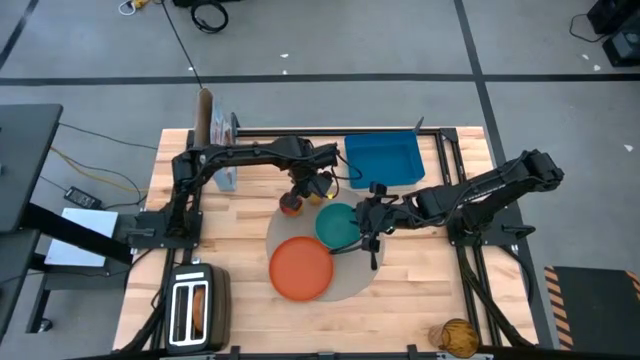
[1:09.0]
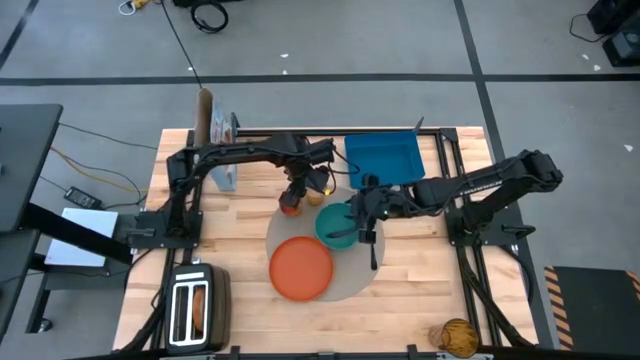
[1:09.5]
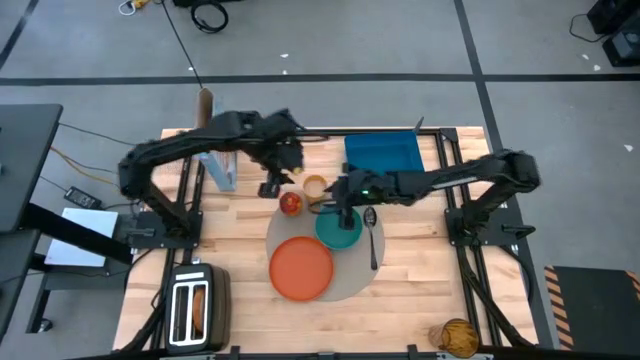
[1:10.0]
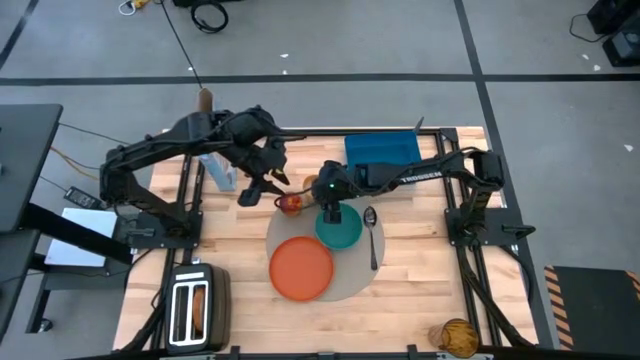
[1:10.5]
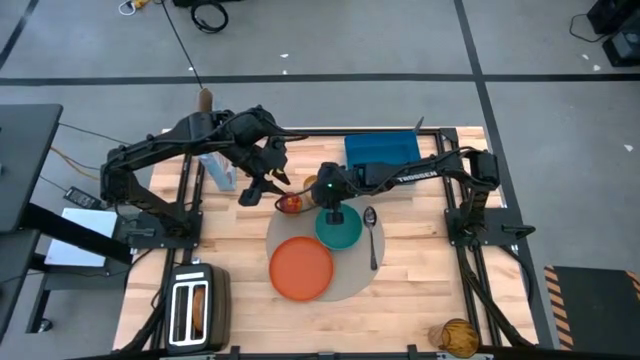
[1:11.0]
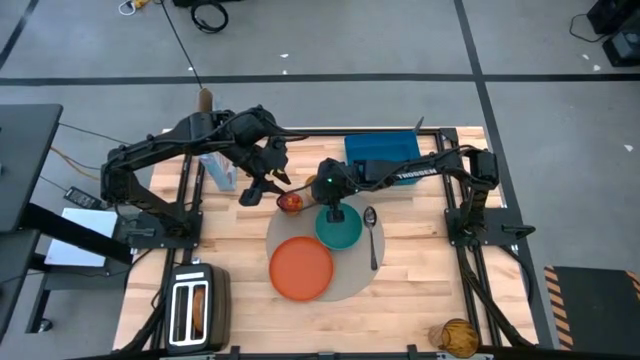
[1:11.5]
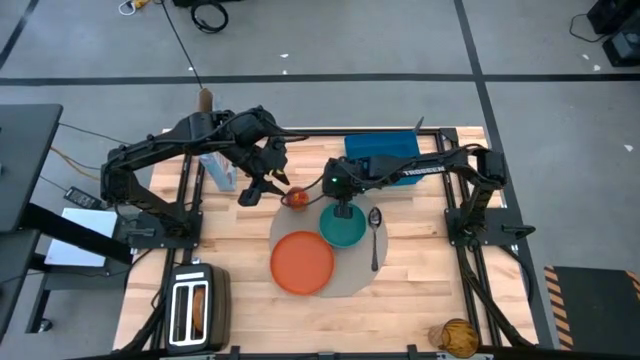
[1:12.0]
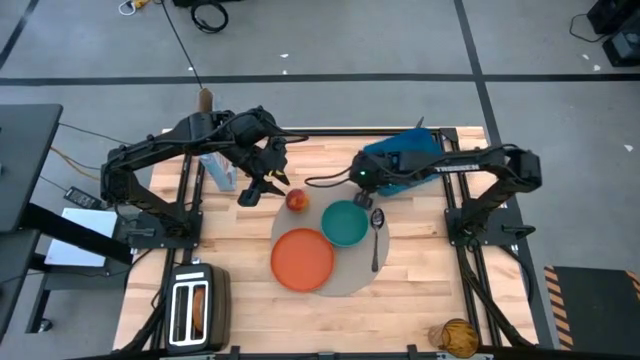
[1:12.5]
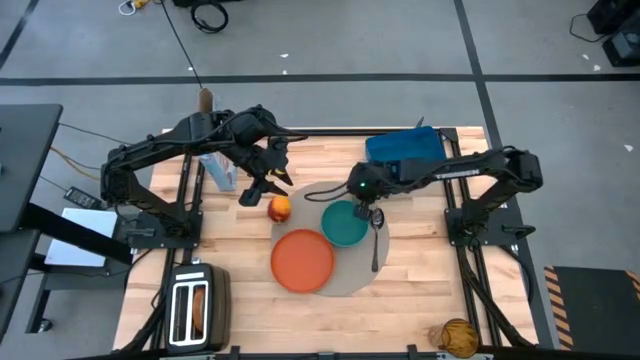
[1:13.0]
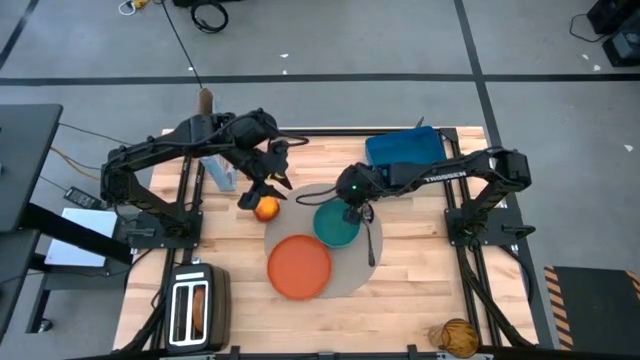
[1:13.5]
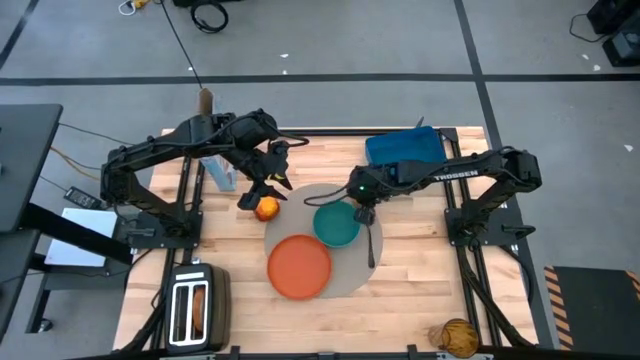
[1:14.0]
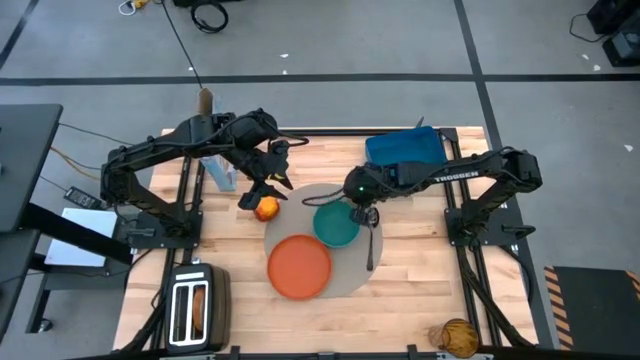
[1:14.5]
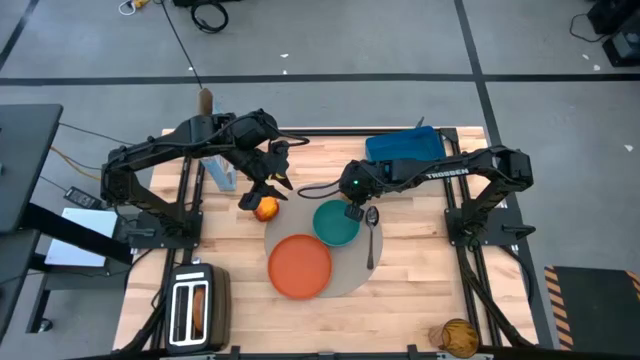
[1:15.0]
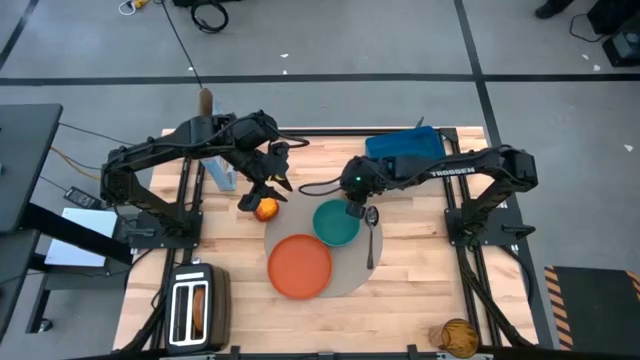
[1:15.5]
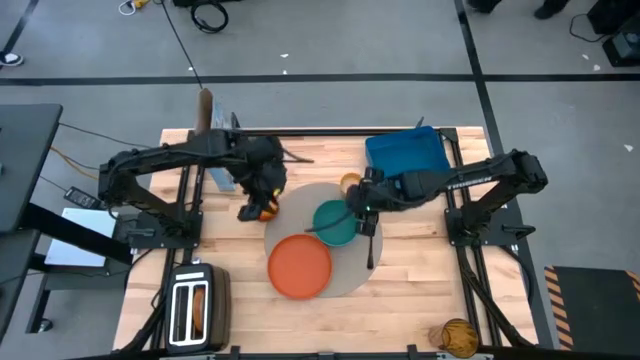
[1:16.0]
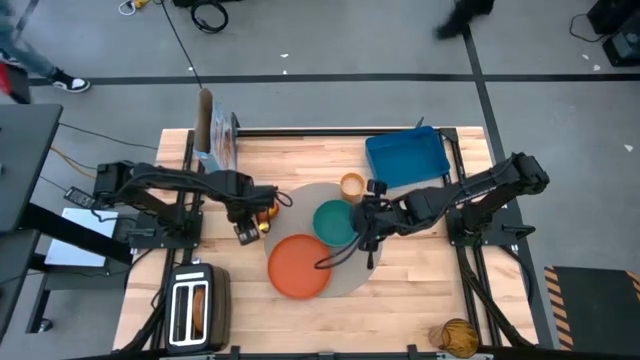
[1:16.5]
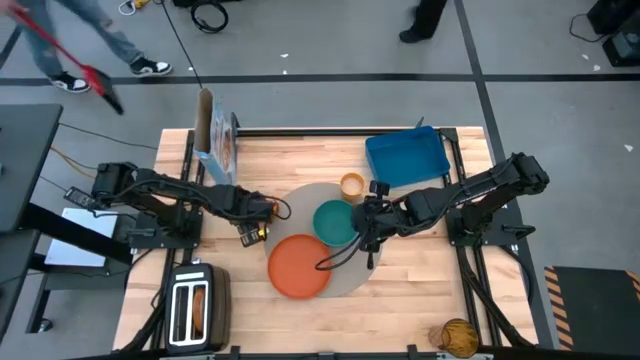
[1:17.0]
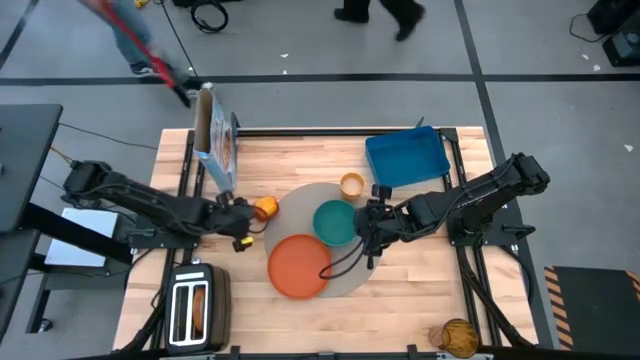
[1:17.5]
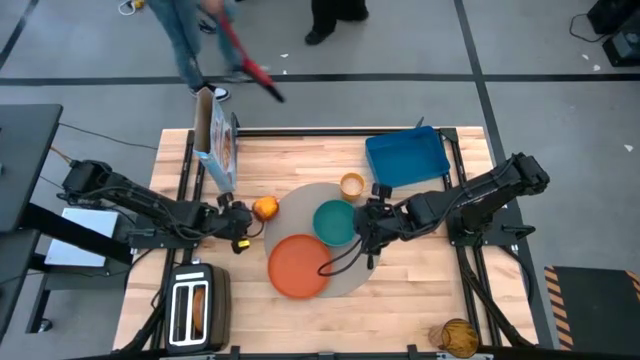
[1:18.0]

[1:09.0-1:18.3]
Task: Arrange a breakfast setting
Put the orange cup with rice grain on top right of the round table mat

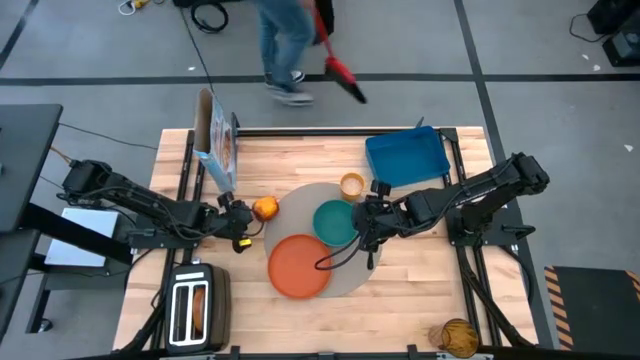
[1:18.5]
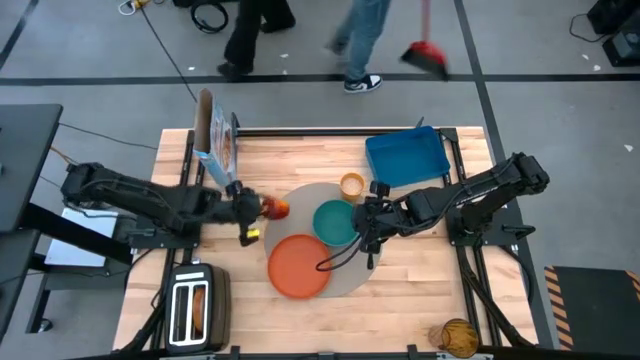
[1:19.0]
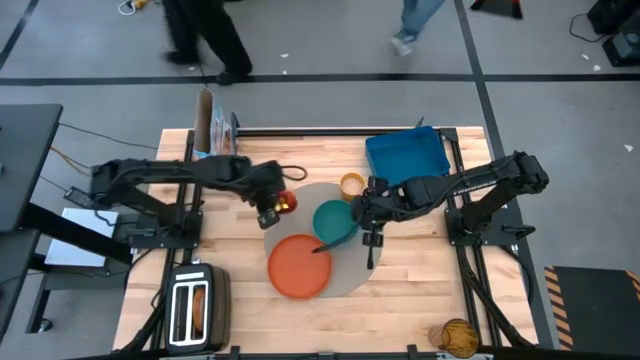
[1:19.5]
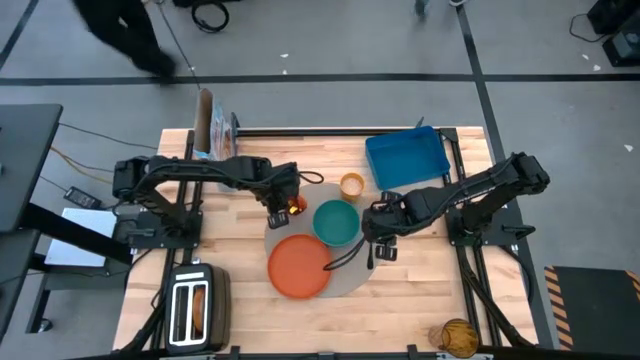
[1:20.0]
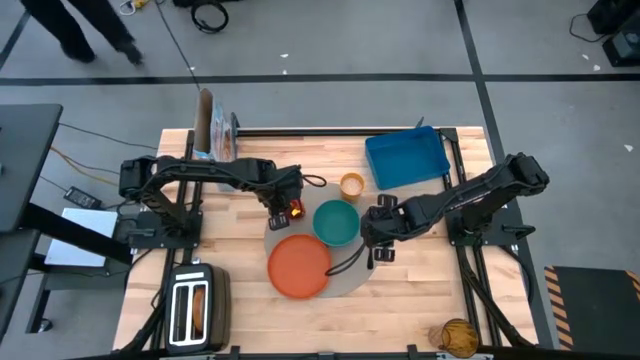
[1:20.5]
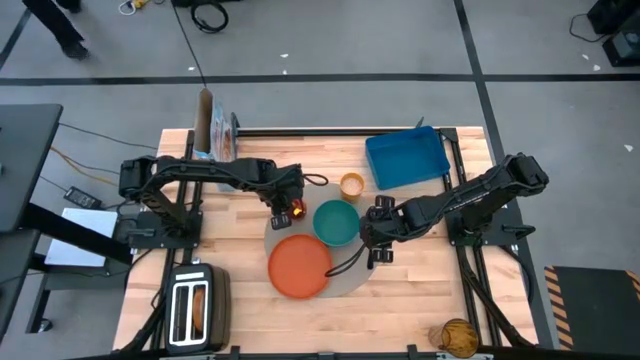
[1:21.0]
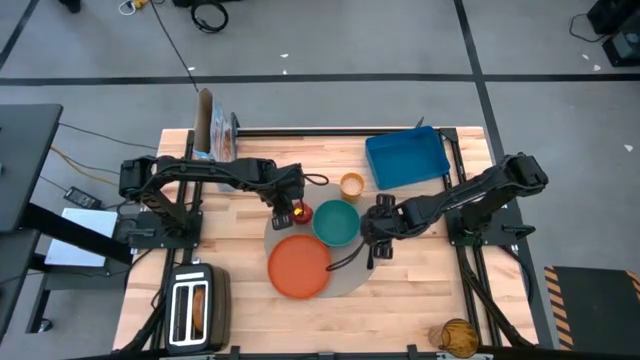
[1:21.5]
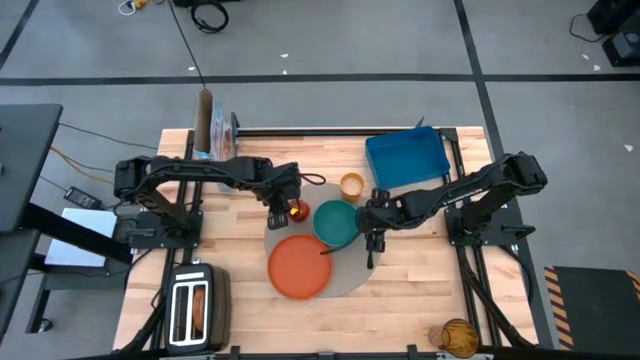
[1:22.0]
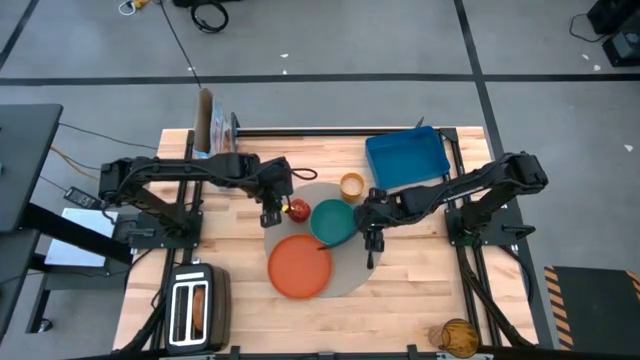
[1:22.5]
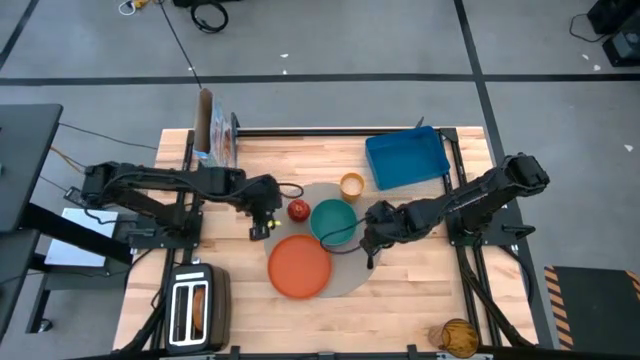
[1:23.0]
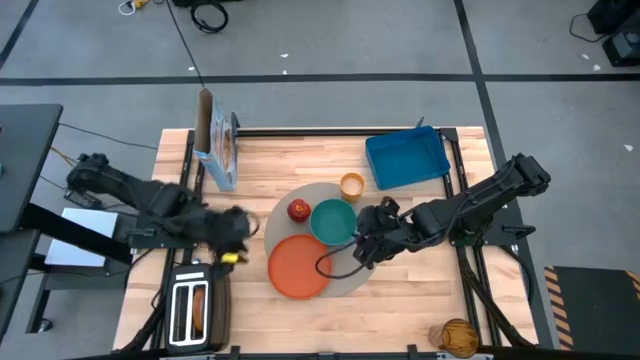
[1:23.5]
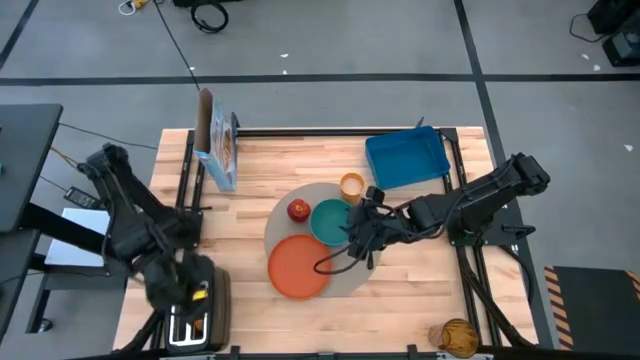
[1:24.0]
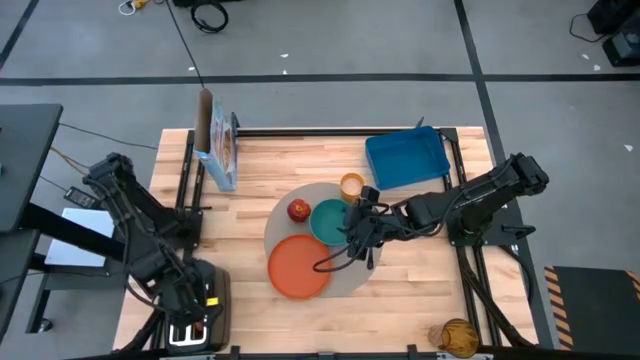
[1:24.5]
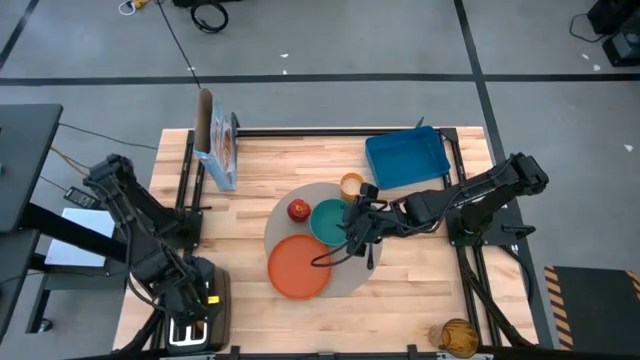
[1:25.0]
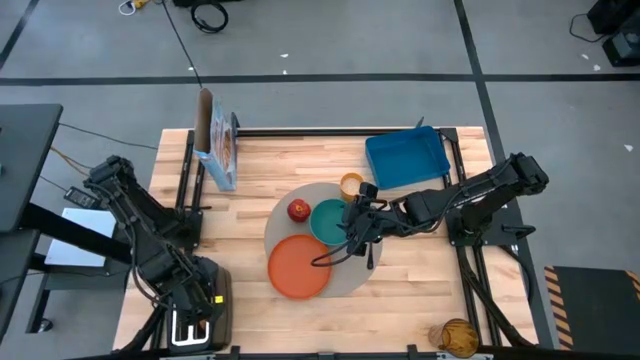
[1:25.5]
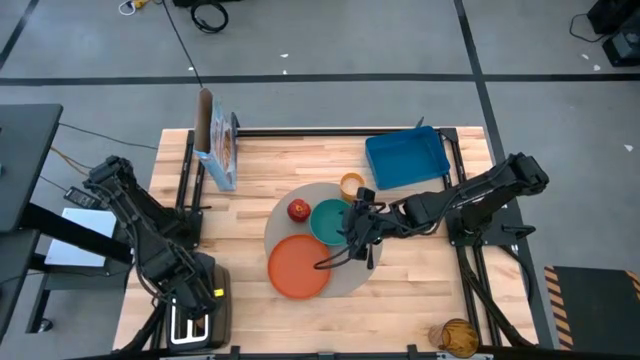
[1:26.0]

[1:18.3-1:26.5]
Adjust the apple on the round table mat

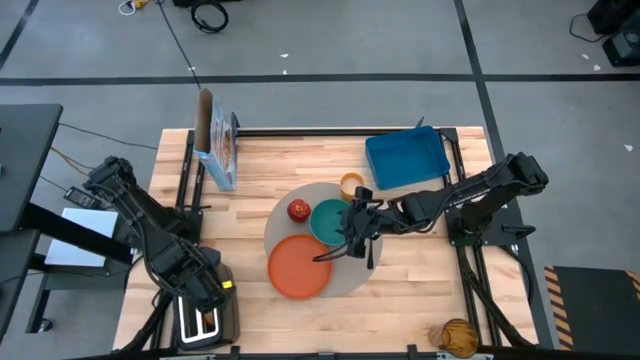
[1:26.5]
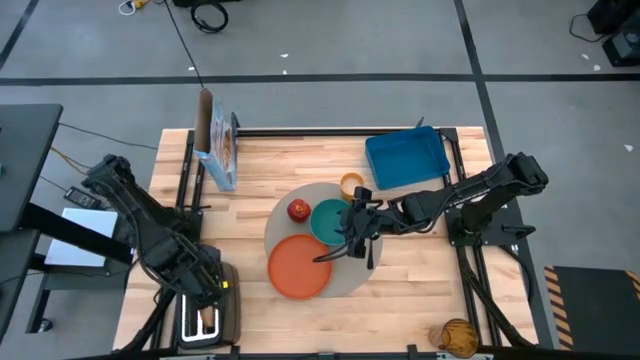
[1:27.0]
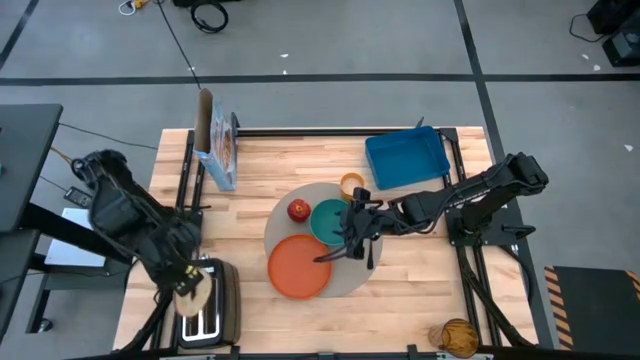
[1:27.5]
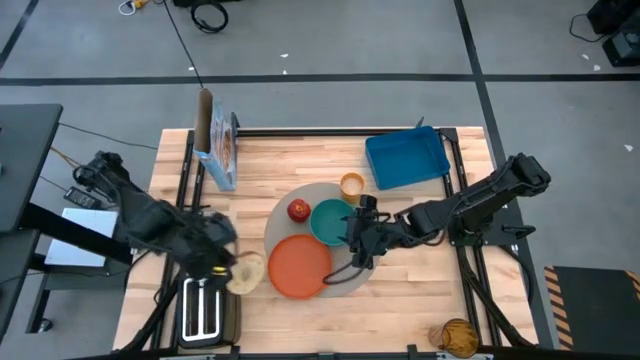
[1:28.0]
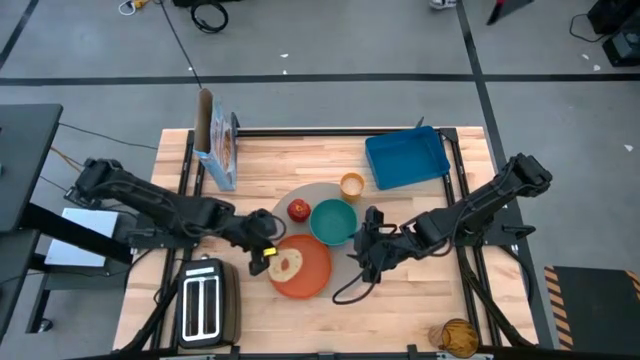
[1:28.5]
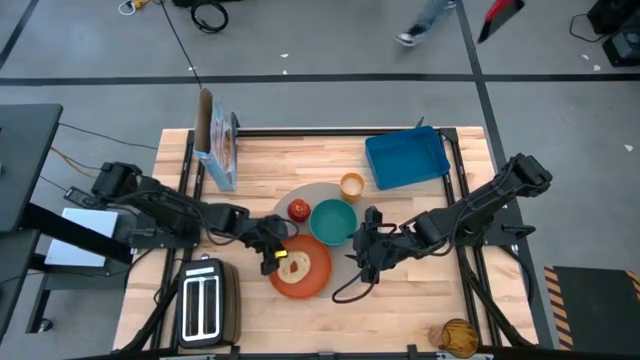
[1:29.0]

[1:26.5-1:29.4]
Put the toasted bread on the orange plate

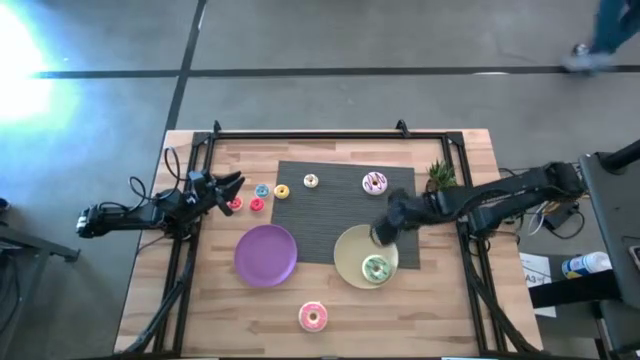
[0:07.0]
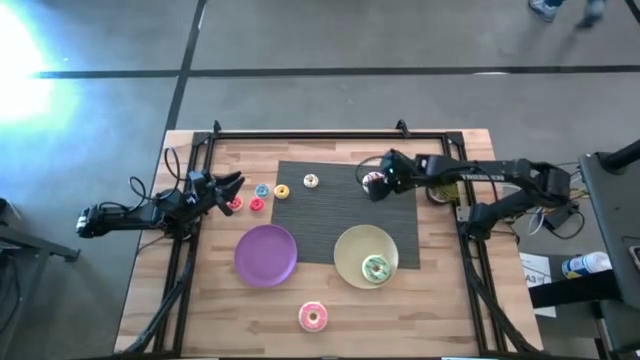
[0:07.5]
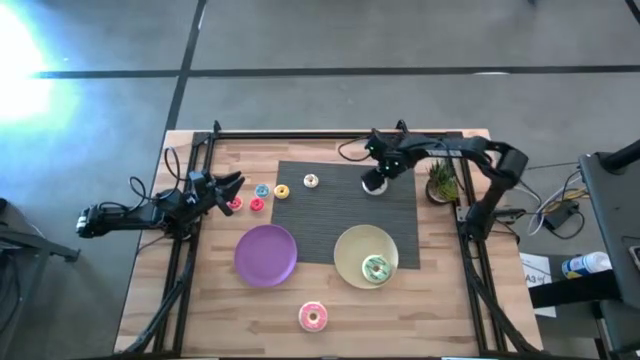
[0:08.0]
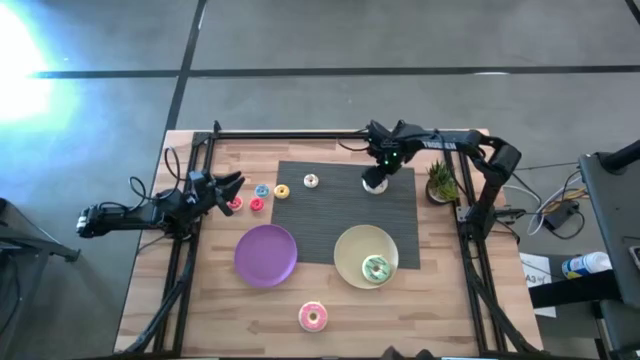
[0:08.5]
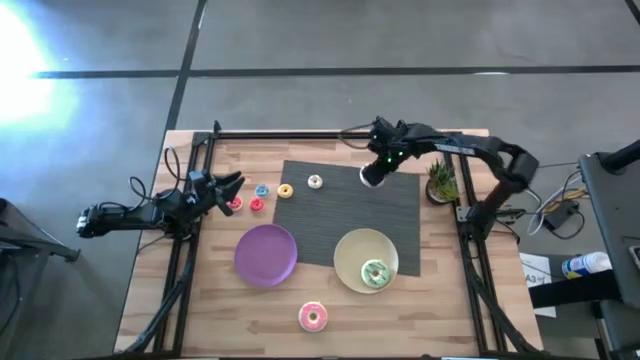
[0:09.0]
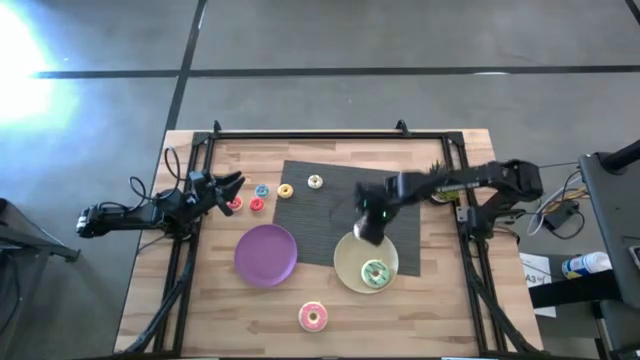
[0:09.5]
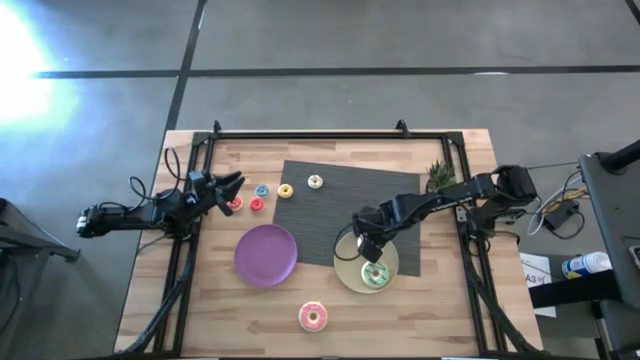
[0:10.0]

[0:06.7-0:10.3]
Task: Pick & Place donuts
Put the large purple donut on the white plate
